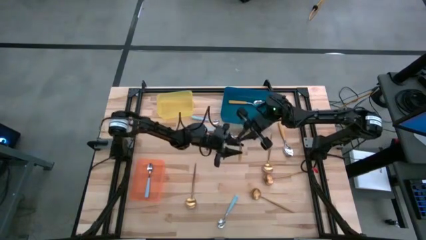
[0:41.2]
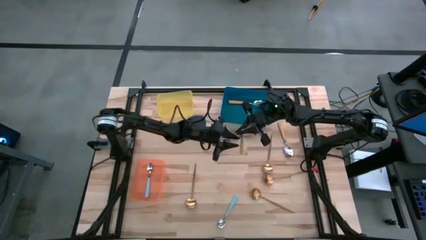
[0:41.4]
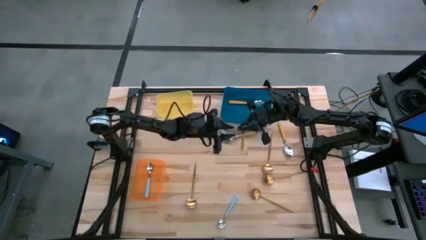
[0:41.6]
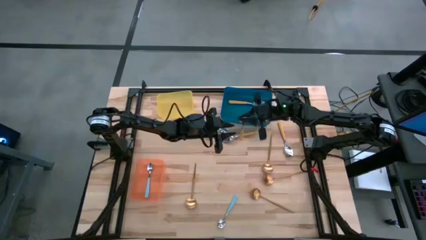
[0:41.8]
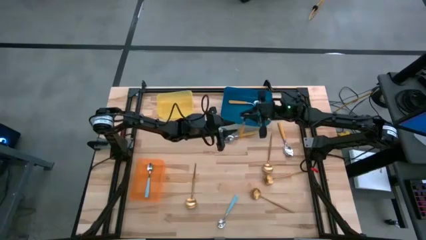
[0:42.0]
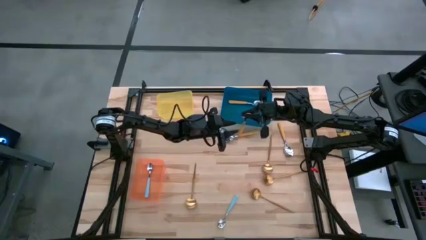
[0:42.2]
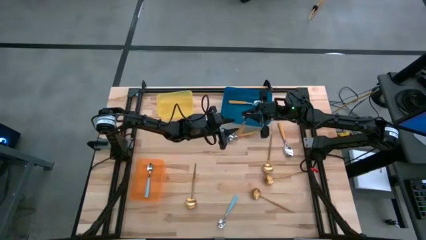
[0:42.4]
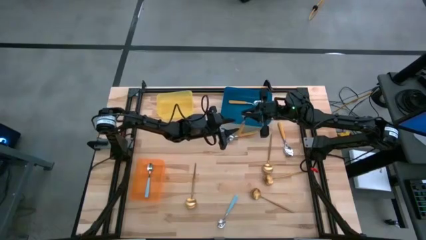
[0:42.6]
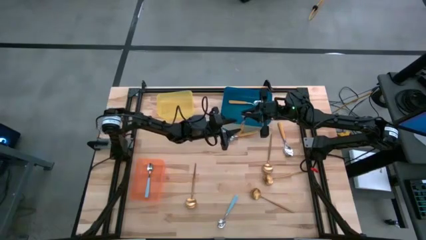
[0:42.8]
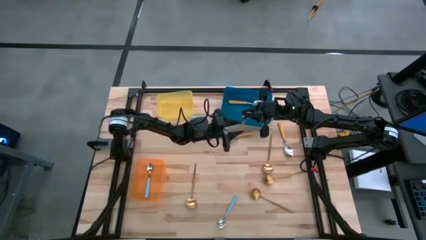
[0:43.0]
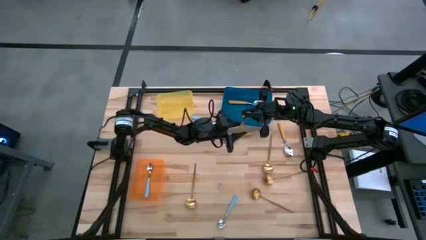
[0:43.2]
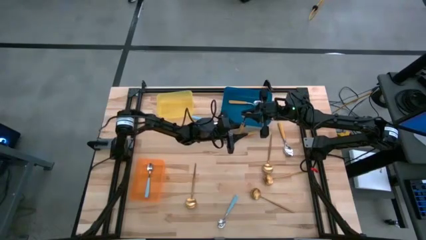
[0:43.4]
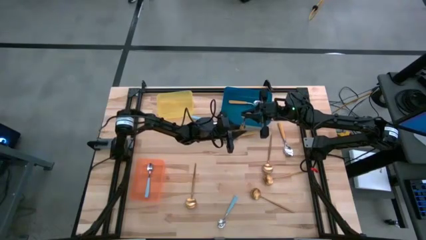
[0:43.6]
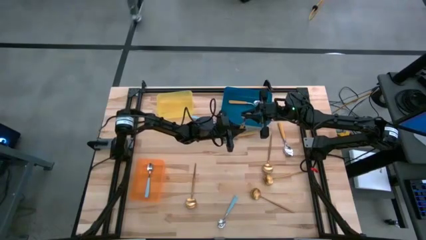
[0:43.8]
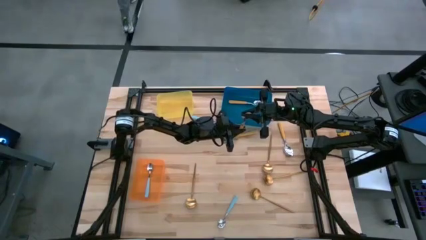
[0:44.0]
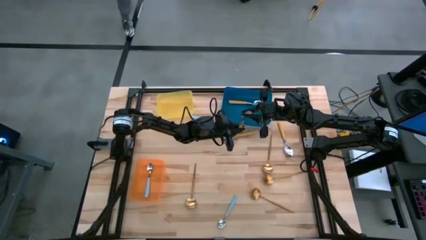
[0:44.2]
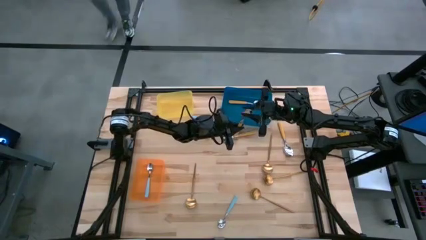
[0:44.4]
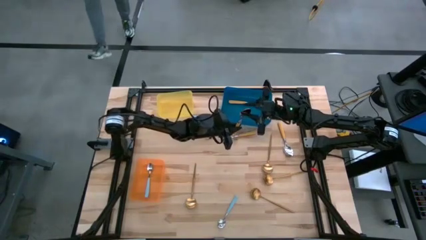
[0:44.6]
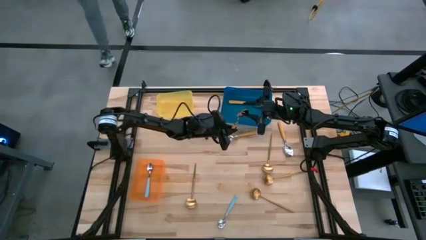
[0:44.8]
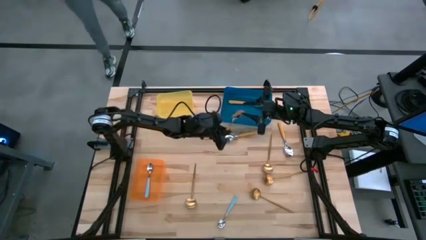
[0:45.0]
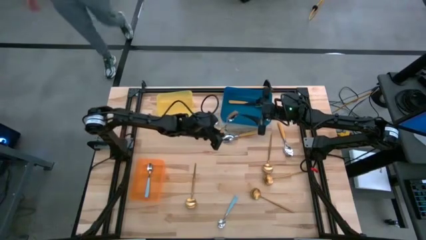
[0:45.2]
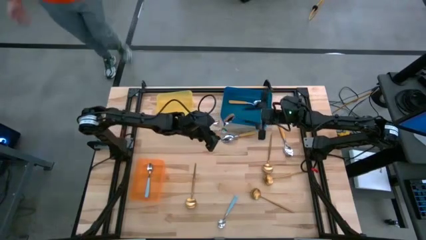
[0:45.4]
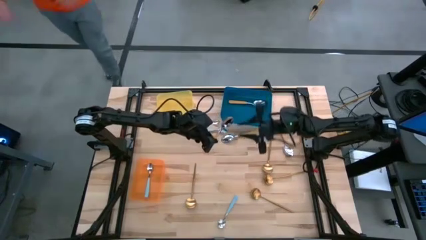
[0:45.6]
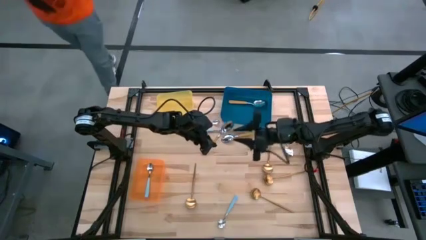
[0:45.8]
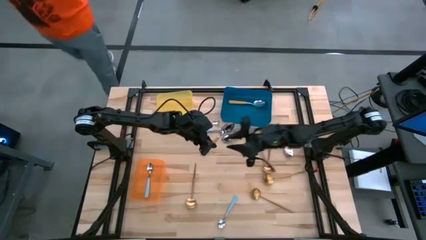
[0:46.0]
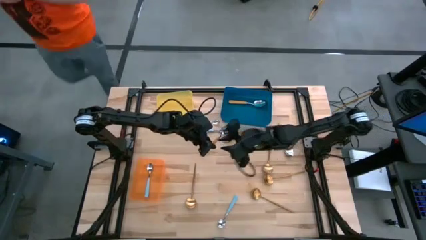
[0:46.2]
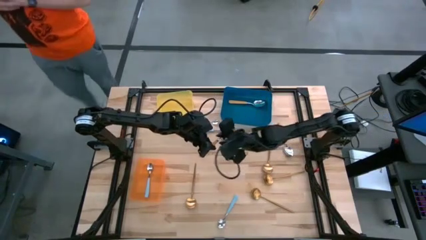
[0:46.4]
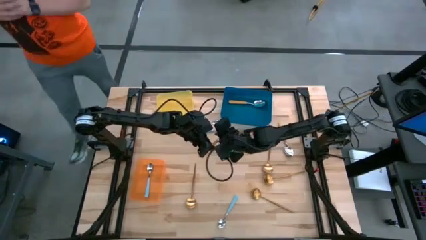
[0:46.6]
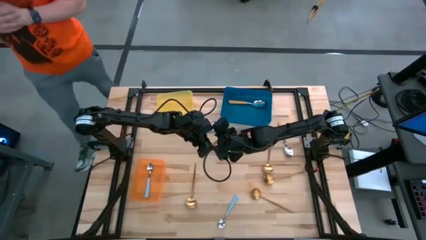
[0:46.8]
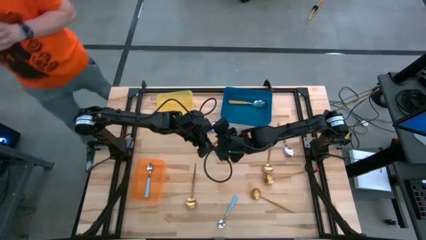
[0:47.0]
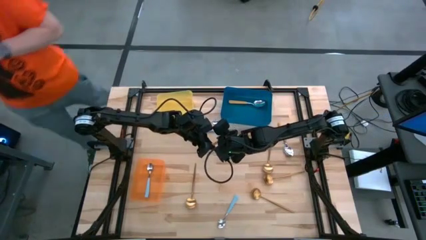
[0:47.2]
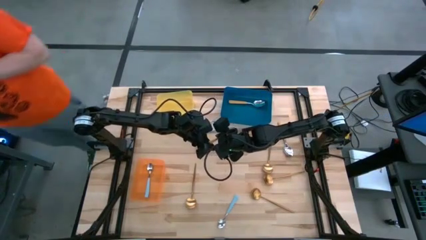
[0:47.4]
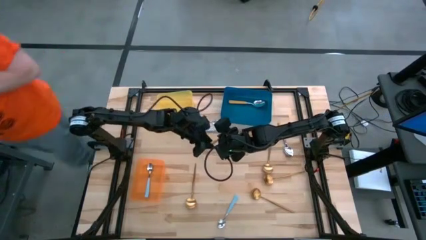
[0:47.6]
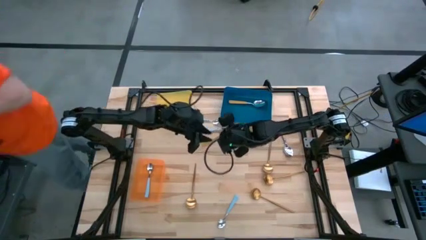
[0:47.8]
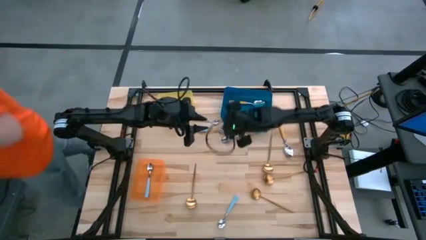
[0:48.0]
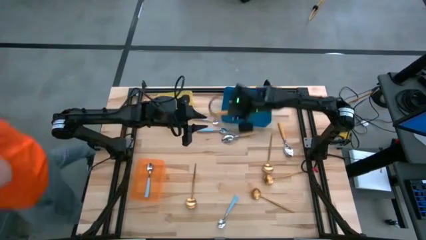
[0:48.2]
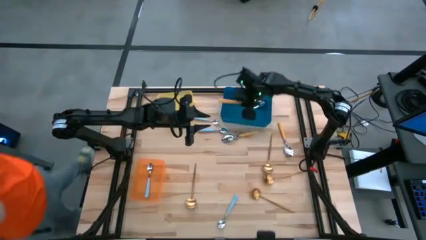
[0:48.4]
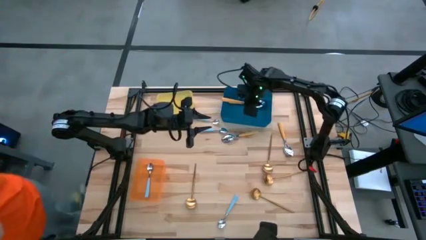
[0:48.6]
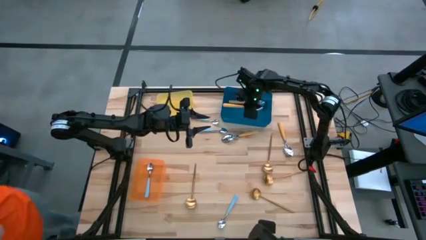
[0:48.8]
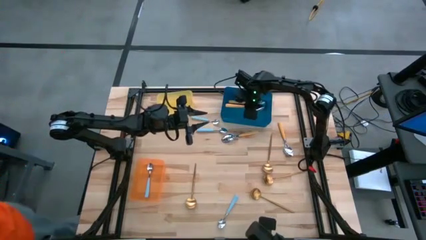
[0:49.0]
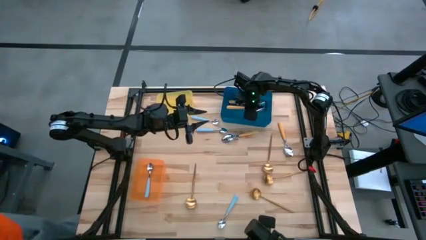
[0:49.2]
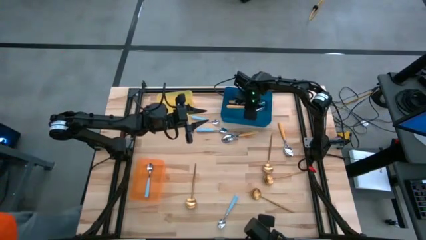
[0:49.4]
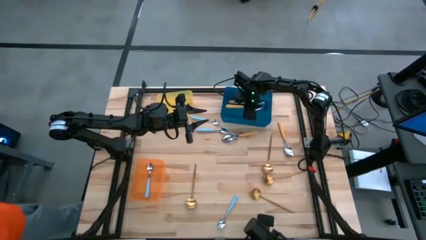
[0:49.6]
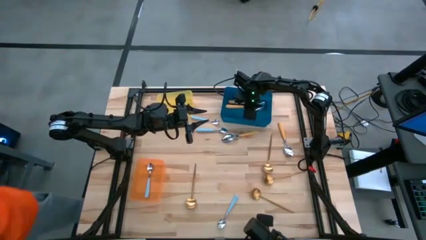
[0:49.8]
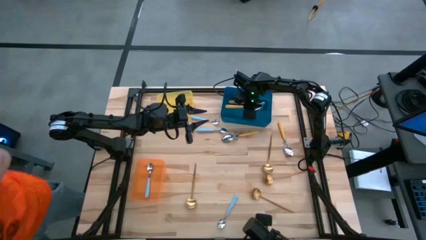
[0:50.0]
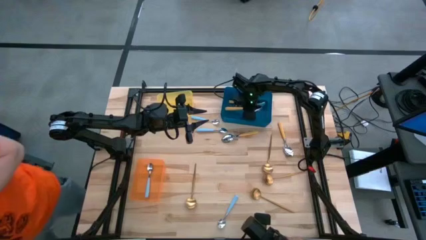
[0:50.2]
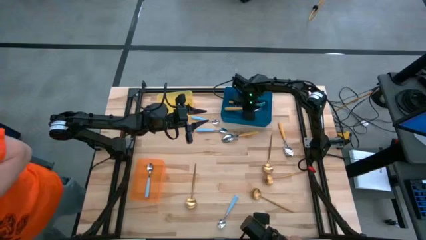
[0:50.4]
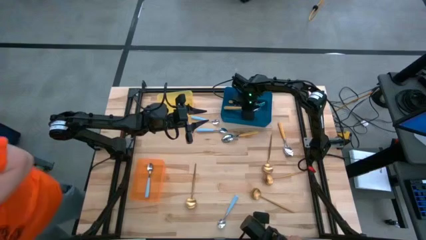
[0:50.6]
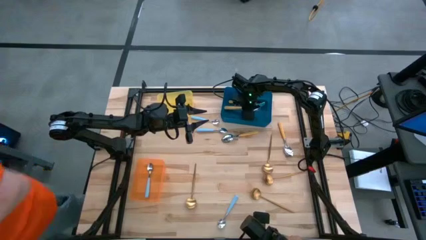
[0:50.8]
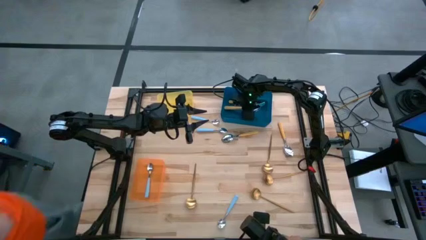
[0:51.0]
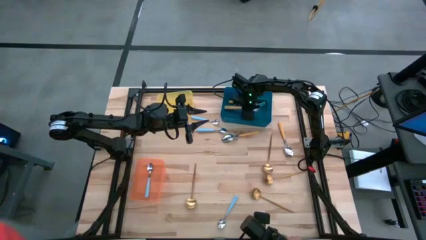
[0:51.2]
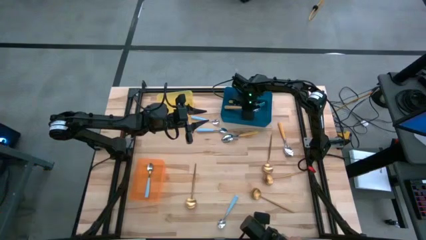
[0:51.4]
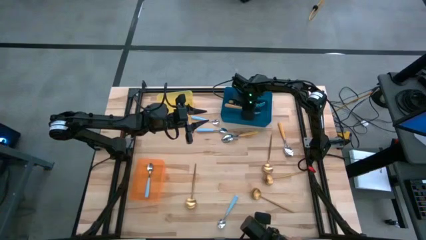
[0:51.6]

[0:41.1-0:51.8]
Task: Sort silverware by color (type)
Put the orange spoon into the blue bin

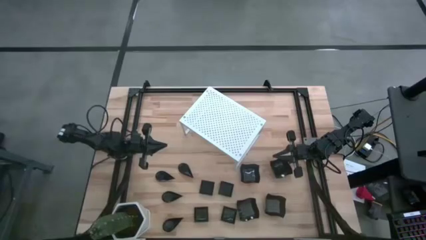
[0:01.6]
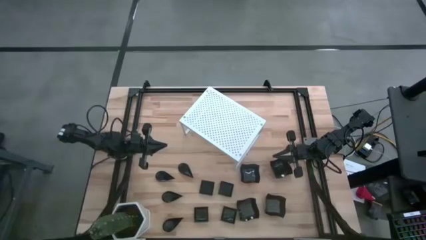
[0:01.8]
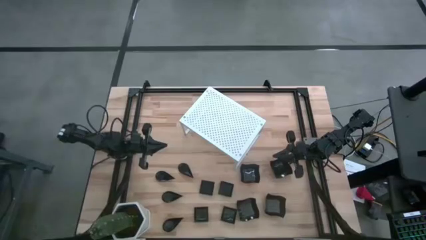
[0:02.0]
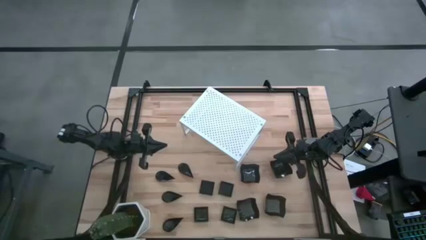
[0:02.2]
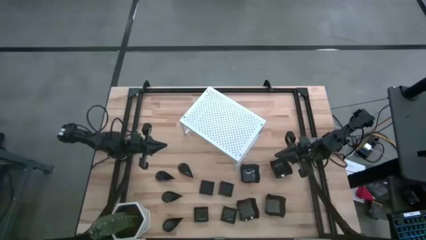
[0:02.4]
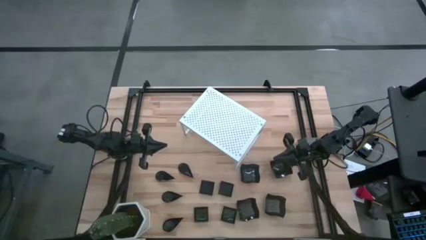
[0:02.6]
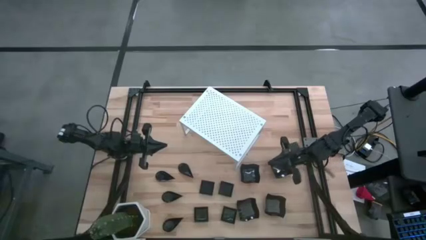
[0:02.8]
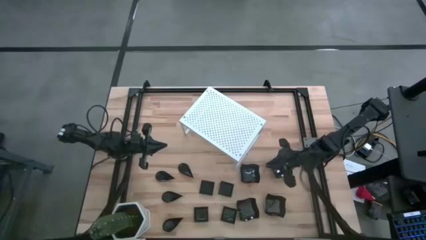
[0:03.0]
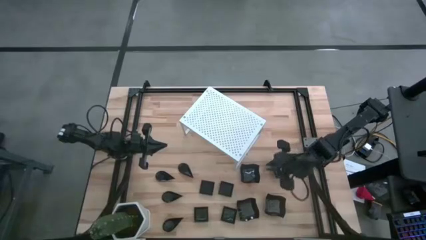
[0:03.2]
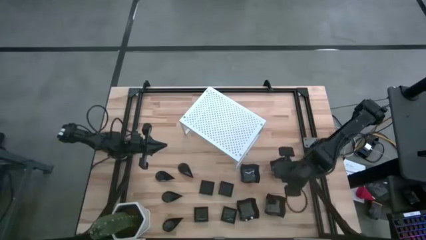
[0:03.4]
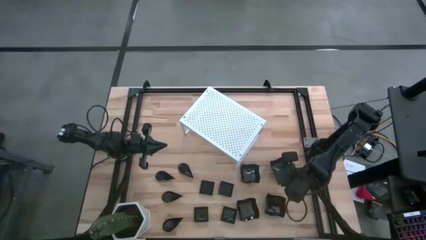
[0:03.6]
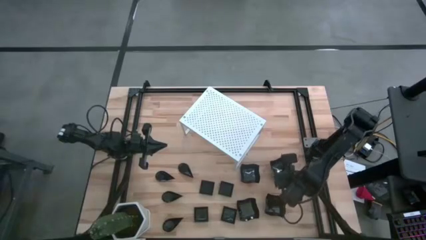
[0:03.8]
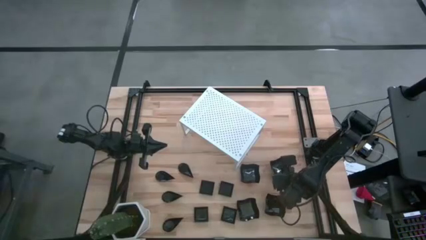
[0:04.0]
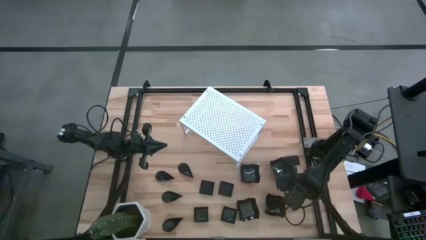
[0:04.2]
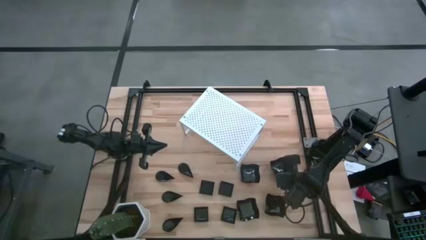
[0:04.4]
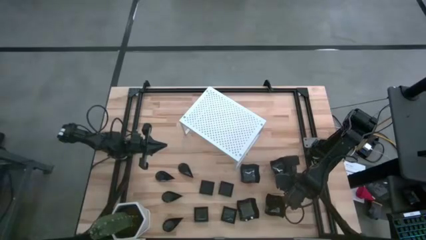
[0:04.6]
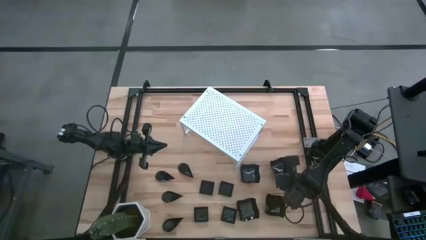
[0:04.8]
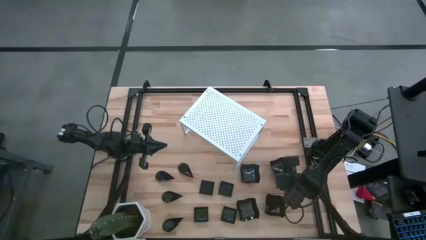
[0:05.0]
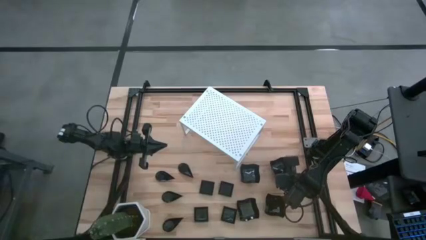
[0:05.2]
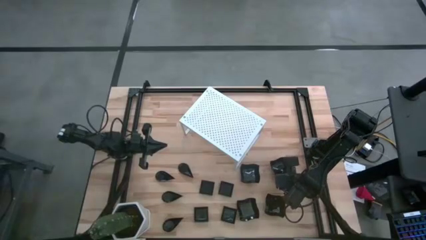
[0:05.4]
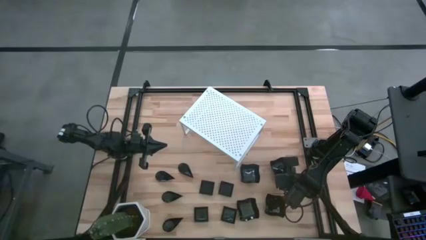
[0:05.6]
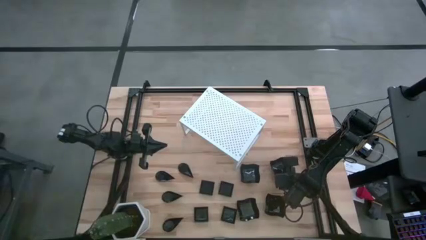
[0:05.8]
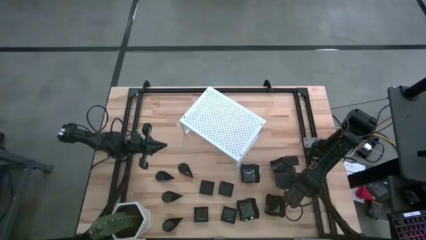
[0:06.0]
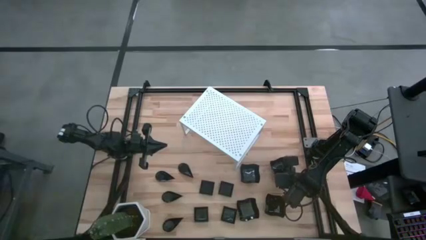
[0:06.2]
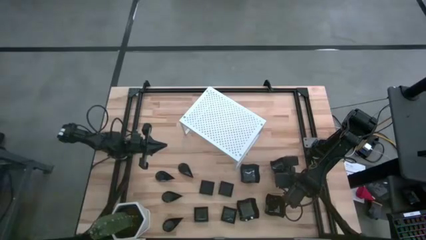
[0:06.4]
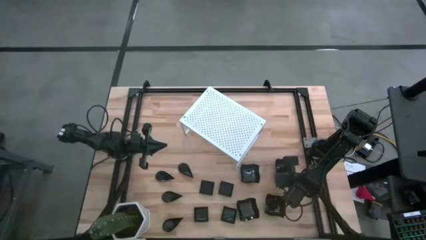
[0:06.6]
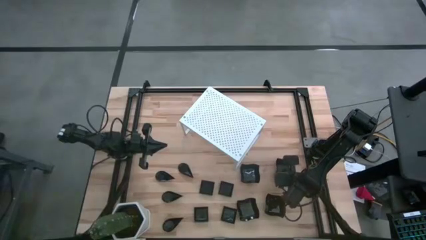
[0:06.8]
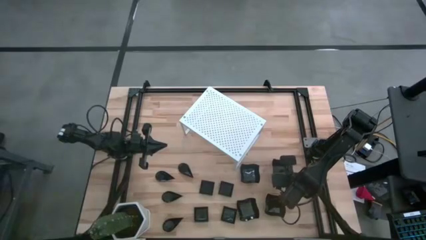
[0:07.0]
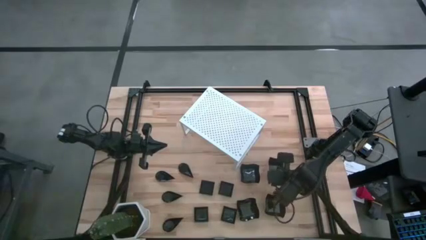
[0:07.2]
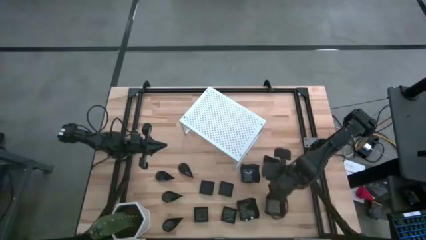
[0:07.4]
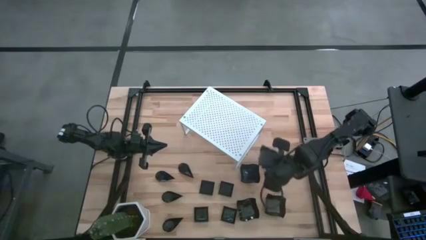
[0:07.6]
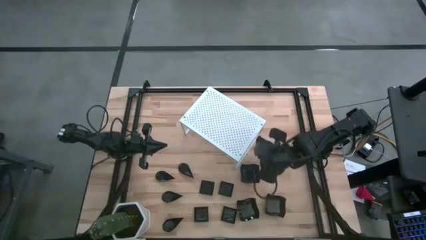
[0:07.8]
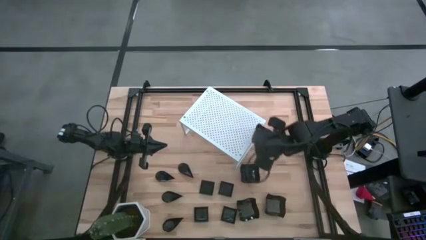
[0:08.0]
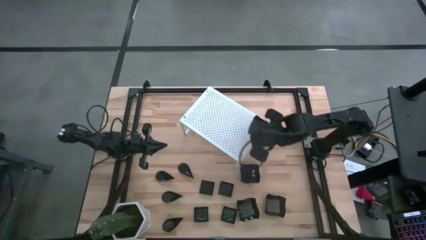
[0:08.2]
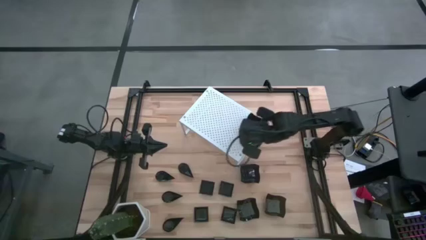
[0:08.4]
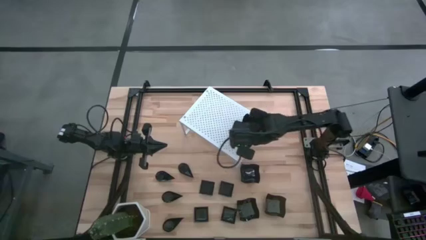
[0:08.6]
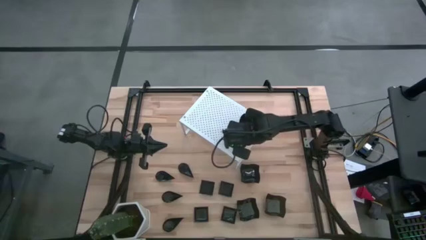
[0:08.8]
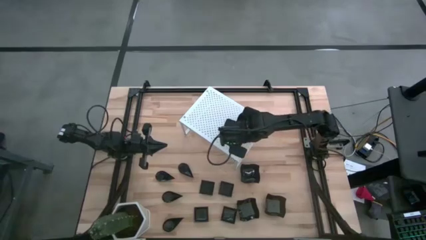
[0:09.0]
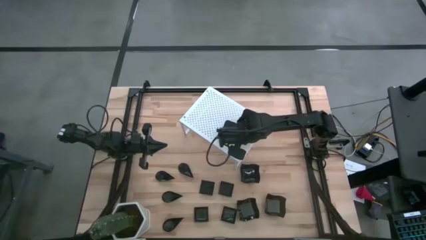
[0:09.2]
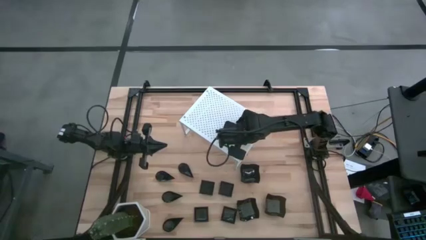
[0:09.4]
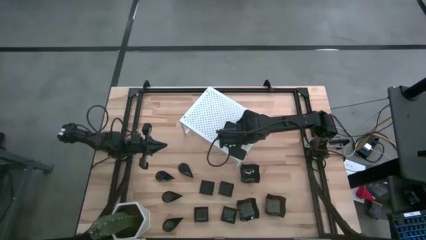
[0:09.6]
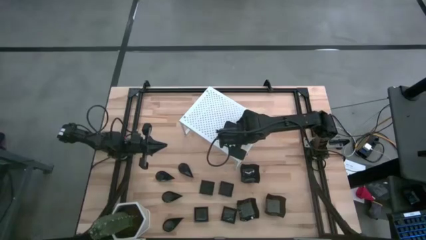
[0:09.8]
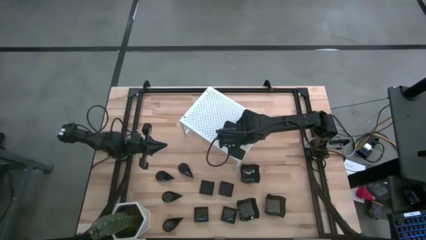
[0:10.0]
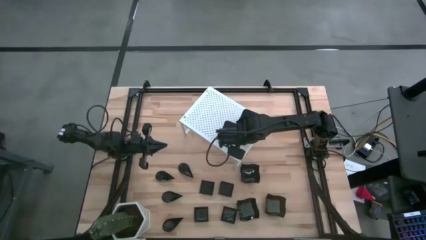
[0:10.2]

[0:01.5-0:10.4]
Task: Pick & Place Mini shaped plates
Put the distorted square plate on the shelf
